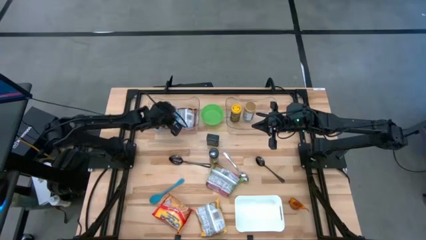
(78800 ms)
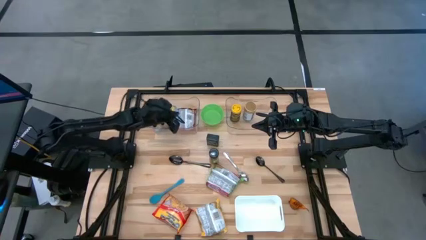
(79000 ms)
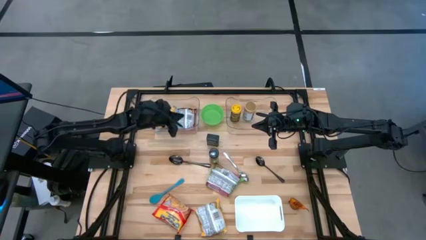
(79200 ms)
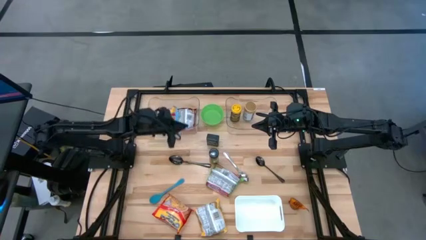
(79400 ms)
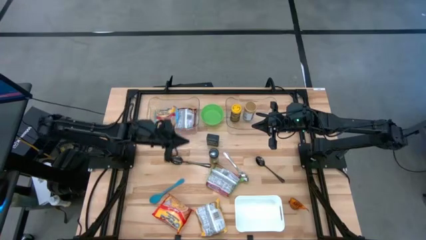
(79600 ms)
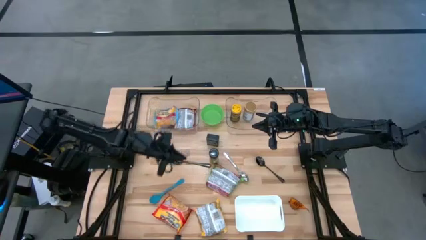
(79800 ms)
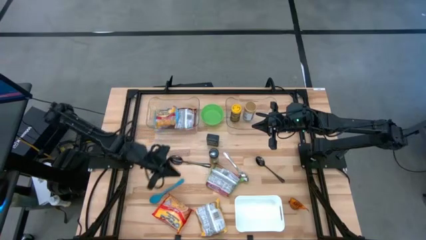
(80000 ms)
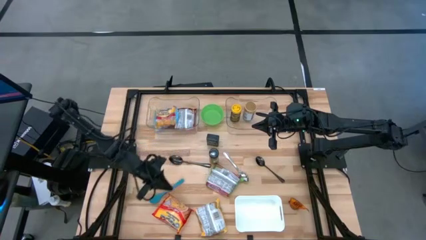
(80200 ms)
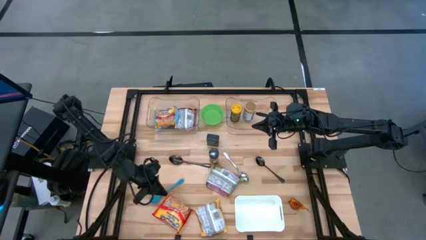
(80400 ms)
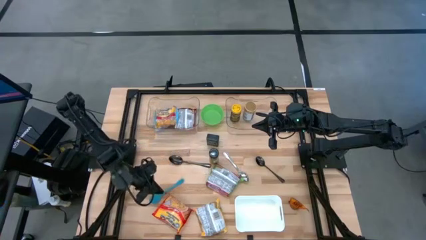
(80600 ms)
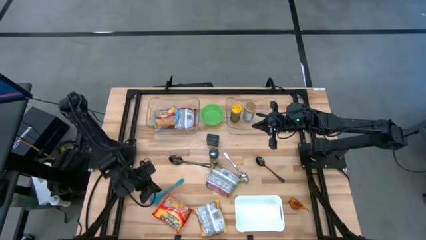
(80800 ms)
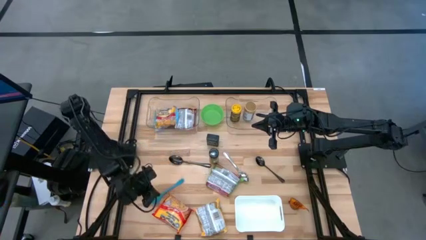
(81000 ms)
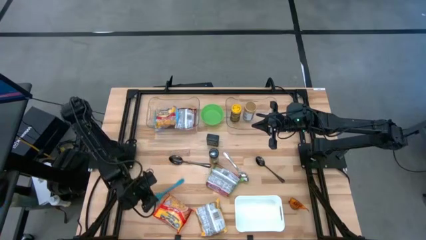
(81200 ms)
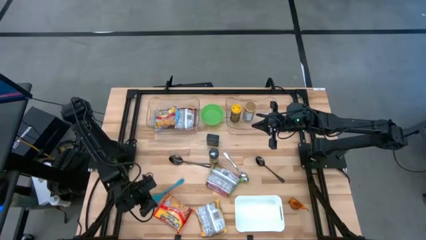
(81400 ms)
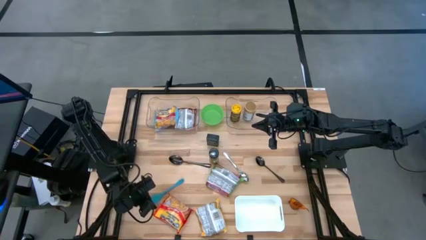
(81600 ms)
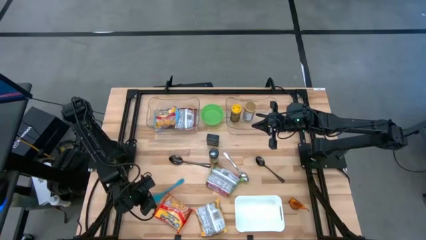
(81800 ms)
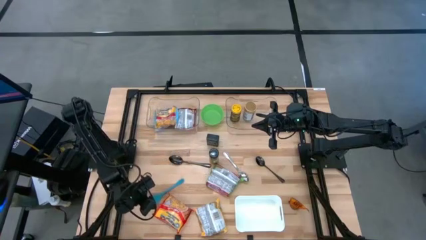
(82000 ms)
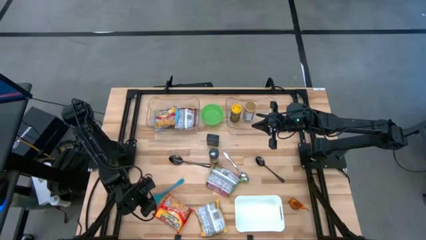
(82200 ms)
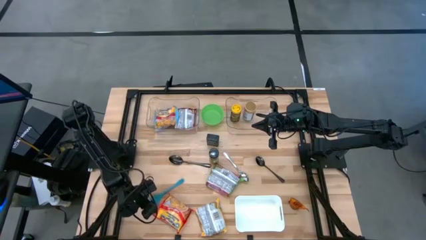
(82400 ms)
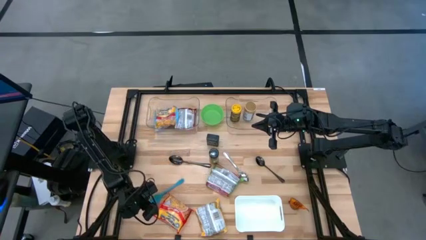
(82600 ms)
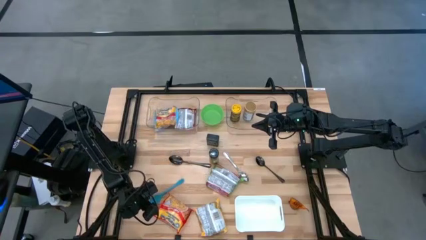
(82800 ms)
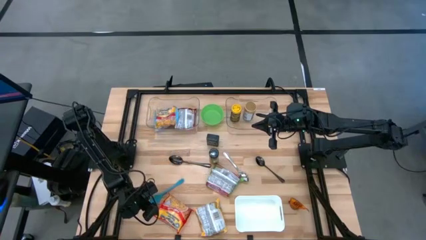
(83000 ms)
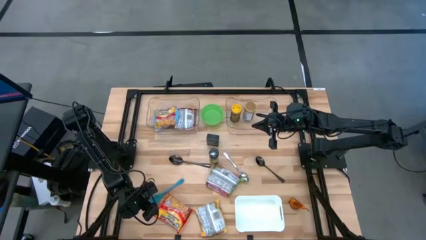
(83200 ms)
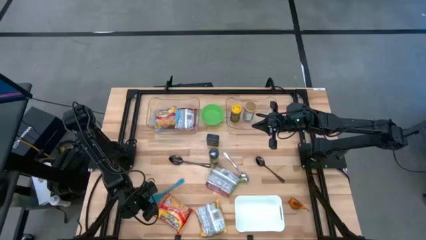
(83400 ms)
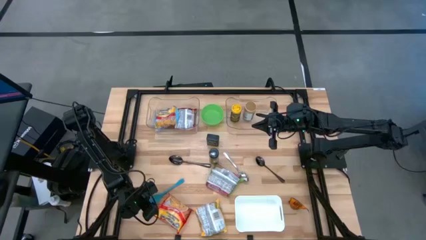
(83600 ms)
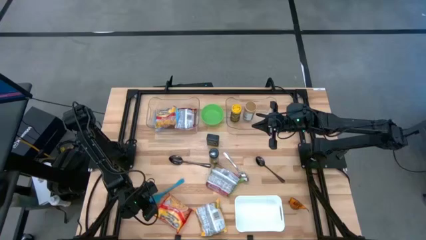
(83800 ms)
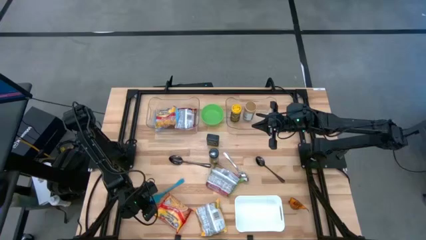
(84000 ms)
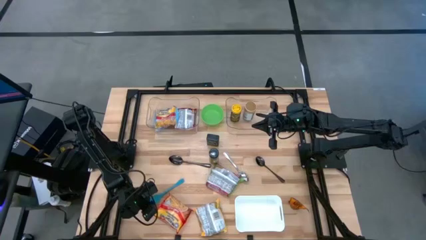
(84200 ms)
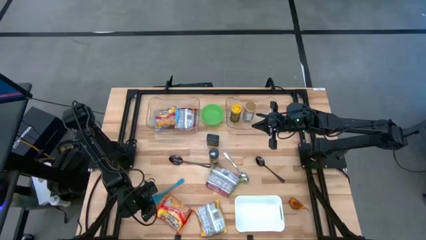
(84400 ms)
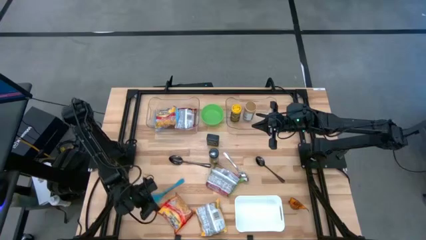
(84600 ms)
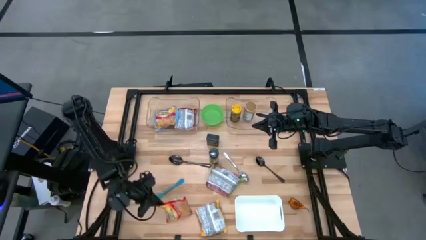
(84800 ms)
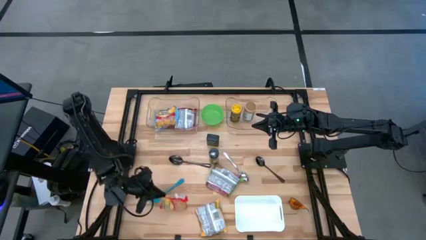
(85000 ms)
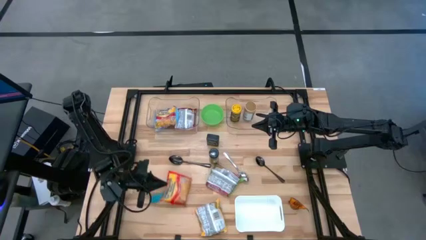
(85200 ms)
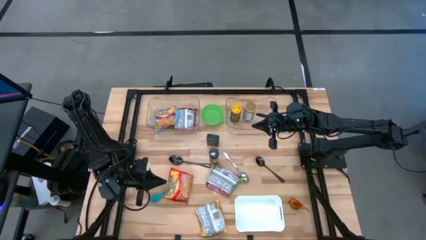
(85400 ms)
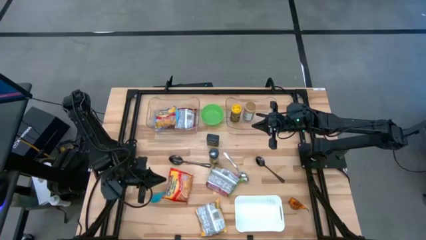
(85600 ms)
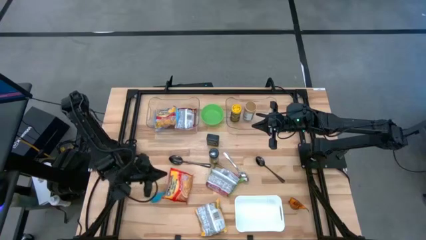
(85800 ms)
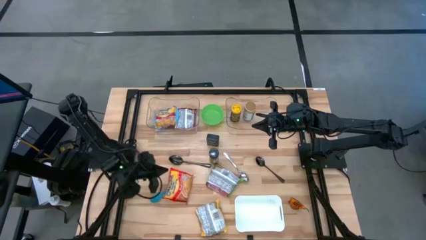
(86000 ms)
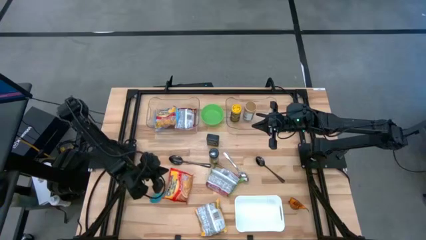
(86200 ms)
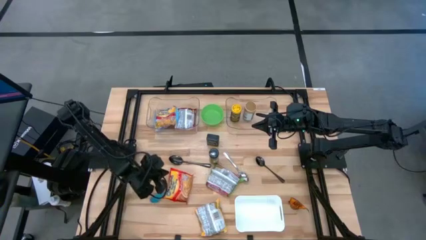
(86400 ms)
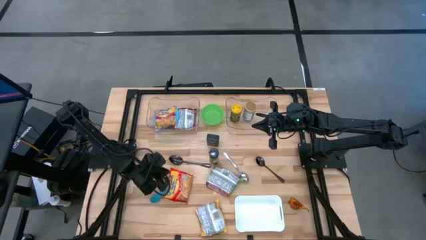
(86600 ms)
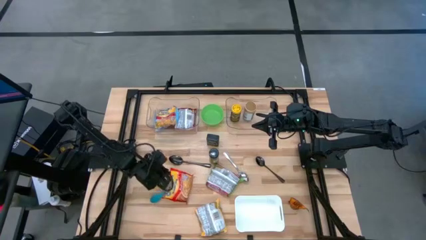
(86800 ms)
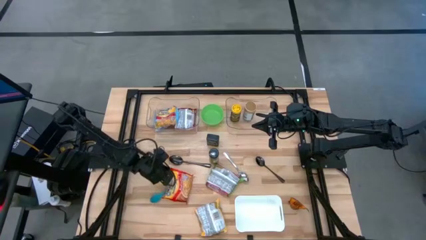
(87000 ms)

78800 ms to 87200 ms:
Task: Pick & Place Food Item
Put the orange noodle pack in the left transparent bin

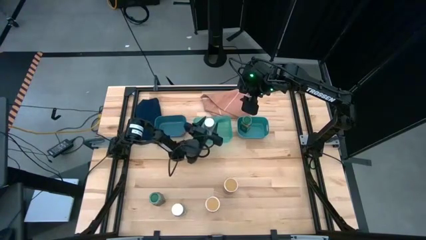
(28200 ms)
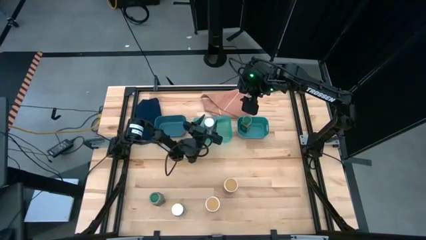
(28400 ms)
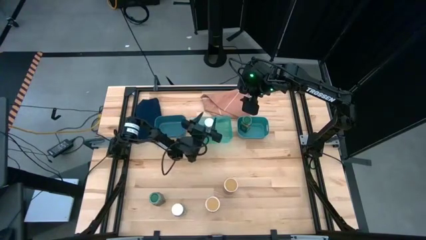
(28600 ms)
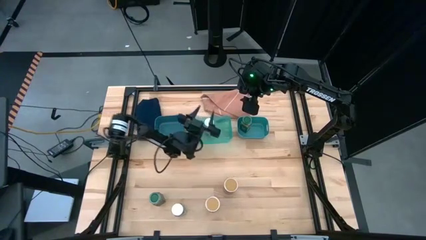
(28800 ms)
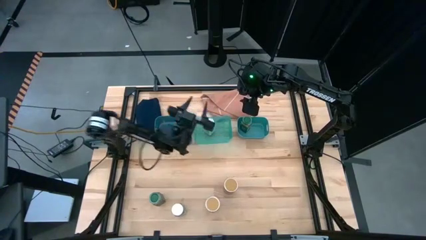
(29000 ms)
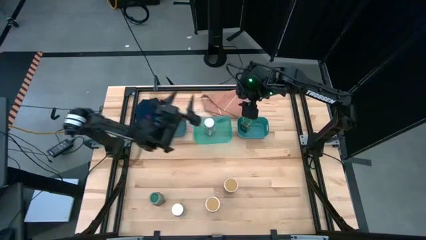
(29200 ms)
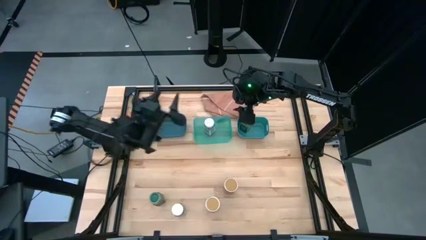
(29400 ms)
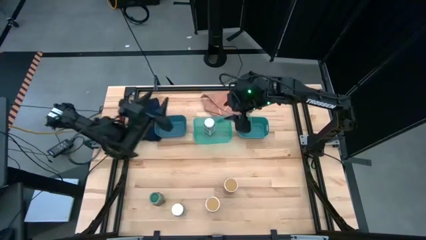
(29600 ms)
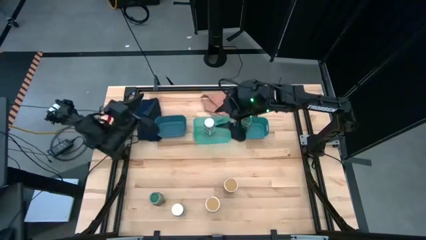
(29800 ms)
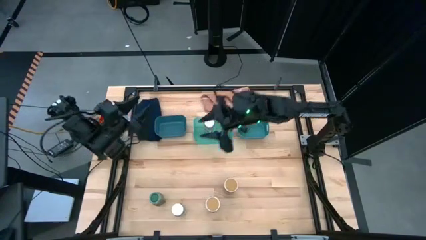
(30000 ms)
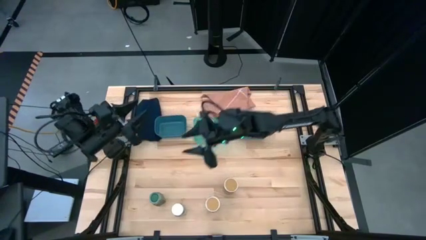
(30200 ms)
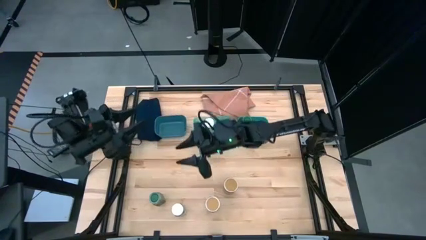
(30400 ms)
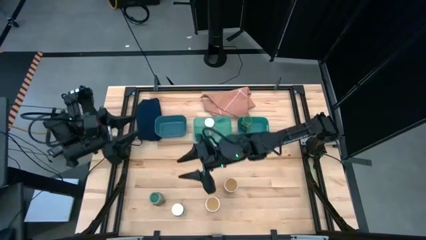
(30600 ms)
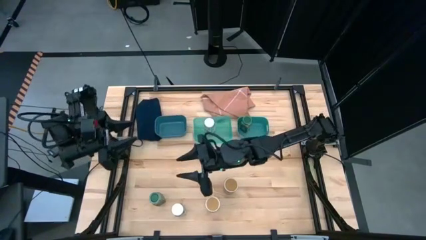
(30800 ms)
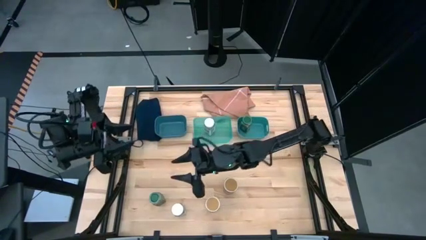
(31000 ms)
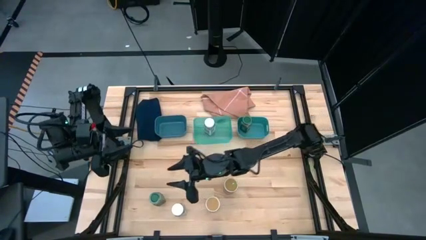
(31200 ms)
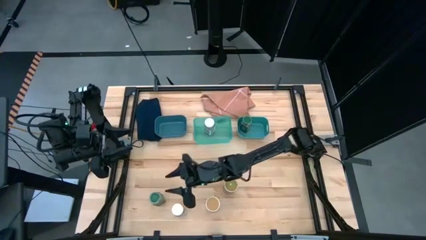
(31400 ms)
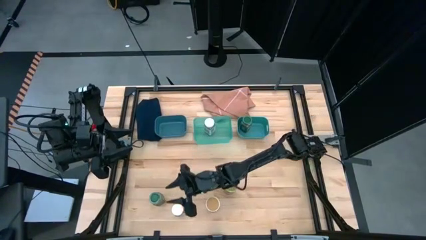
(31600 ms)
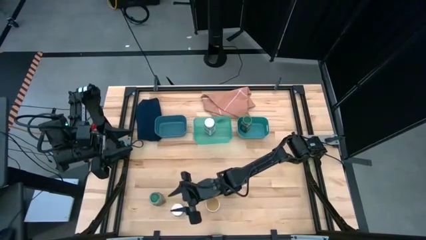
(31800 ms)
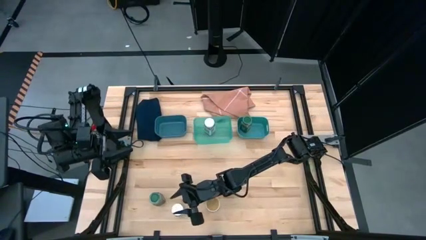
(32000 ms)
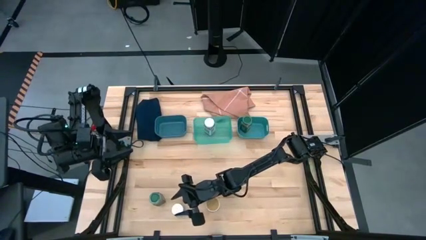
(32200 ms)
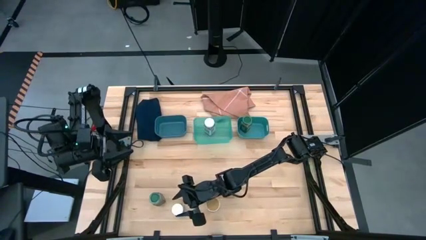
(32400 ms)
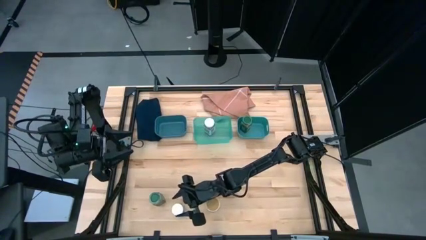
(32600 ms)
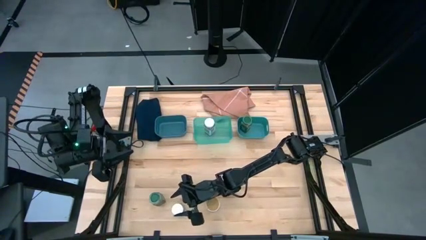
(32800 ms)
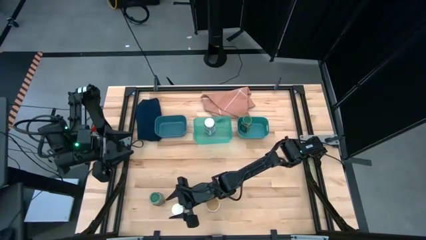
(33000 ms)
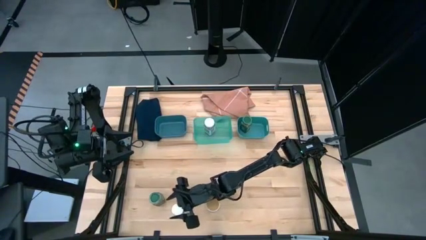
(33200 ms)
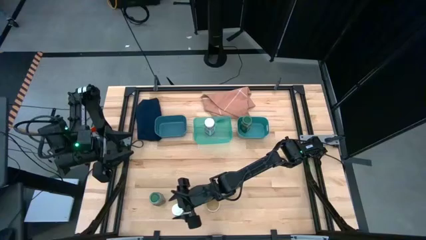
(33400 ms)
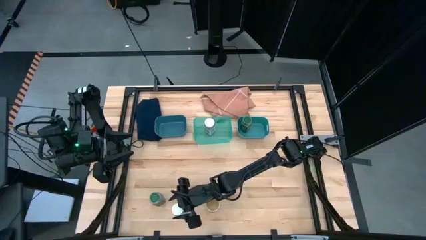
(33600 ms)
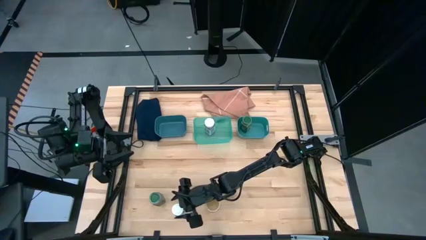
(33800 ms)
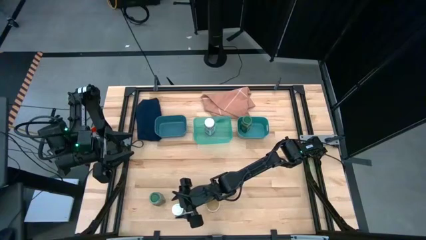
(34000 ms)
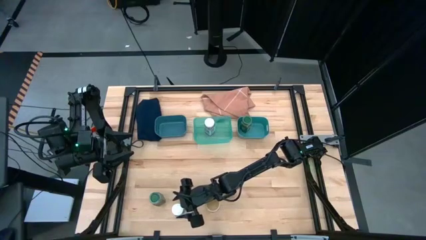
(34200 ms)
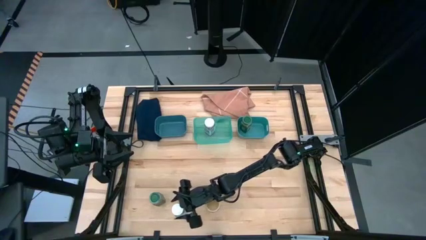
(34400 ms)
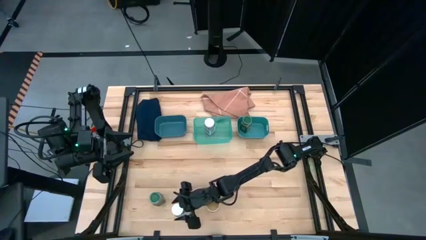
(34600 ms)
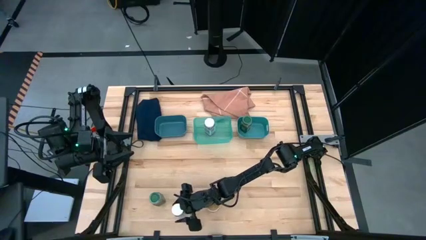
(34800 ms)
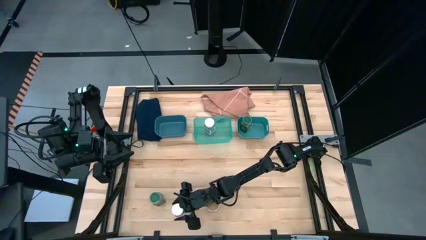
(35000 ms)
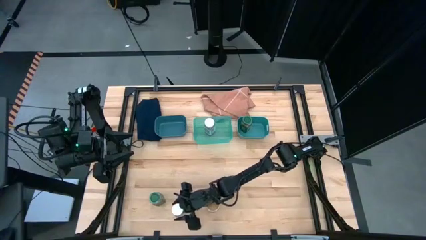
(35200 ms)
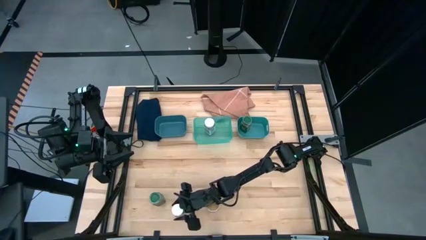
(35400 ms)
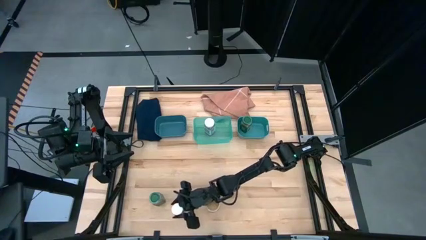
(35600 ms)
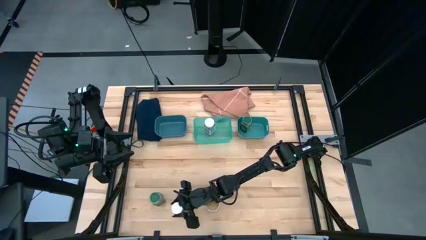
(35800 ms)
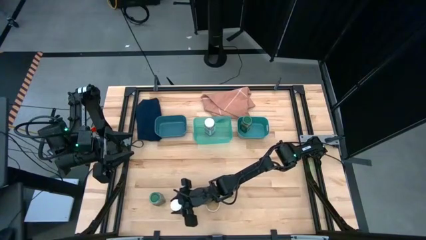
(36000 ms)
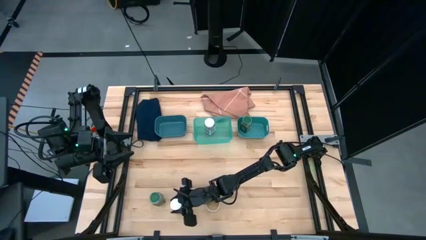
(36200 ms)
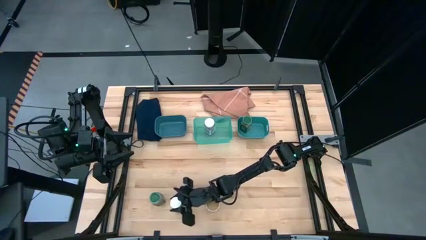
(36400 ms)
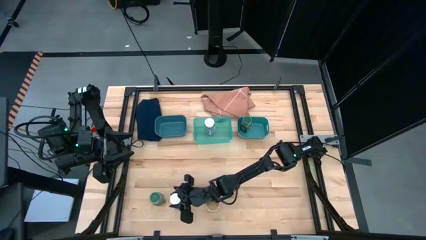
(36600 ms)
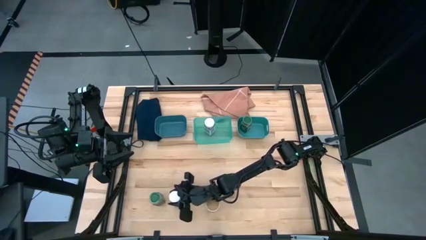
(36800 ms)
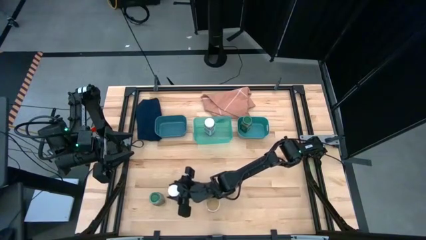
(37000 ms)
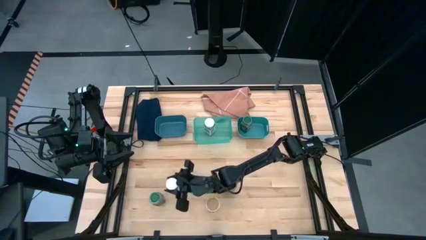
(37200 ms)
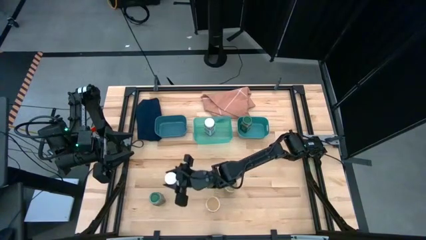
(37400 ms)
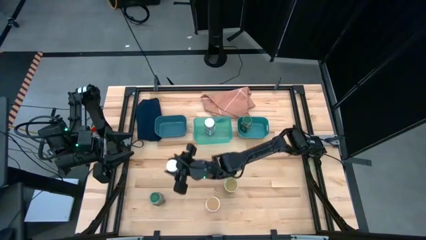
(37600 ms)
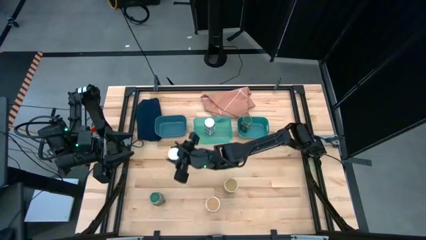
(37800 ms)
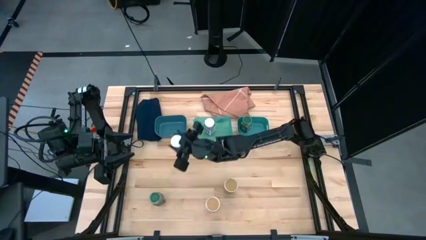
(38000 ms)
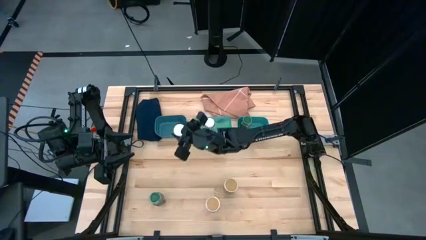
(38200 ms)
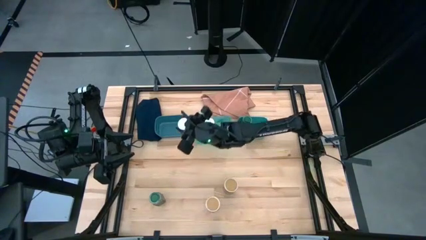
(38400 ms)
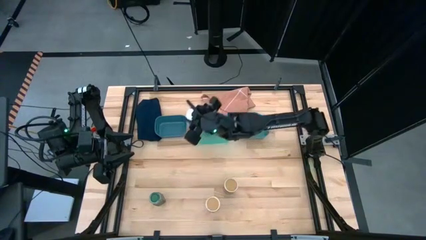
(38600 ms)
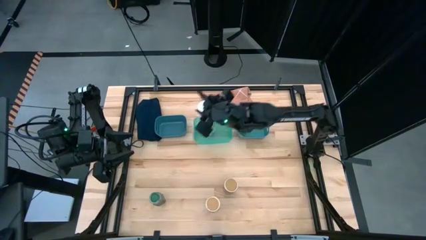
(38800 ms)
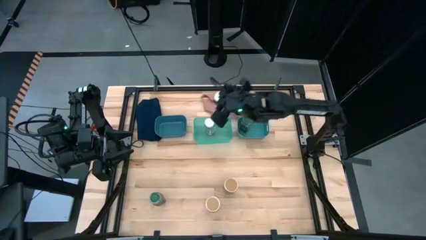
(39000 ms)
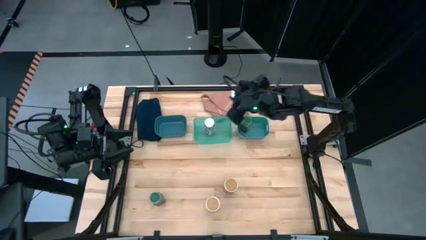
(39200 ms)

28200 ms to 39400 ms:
Task: Sort spices by type
Put the white seasoning bottle into the transparent green bin
